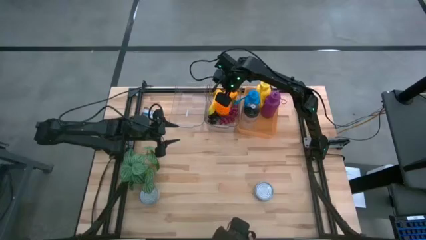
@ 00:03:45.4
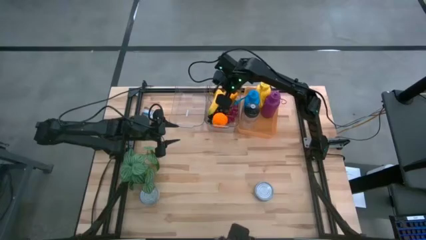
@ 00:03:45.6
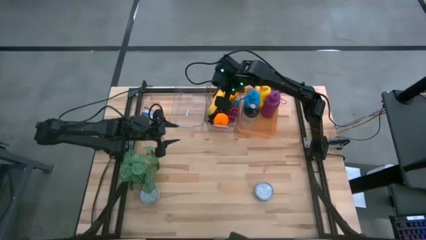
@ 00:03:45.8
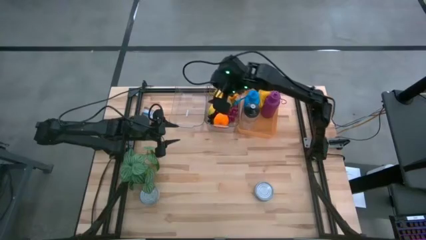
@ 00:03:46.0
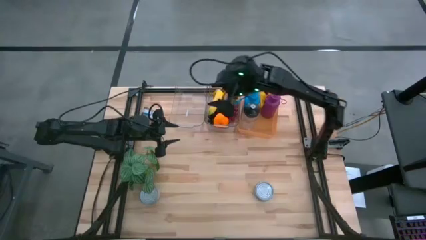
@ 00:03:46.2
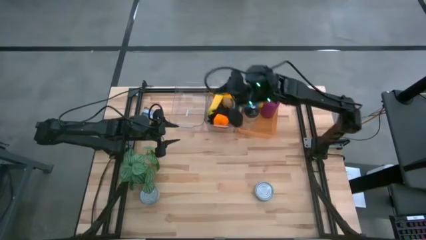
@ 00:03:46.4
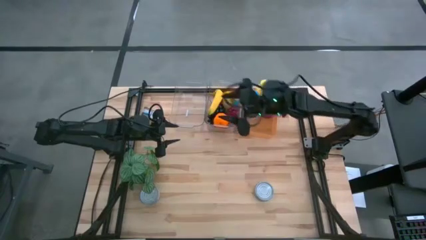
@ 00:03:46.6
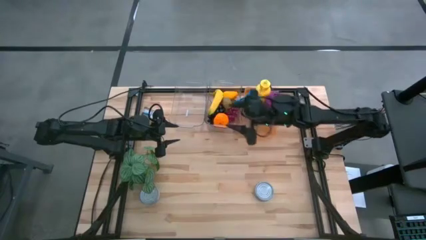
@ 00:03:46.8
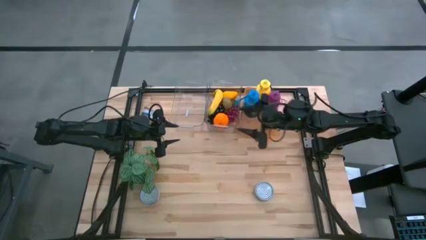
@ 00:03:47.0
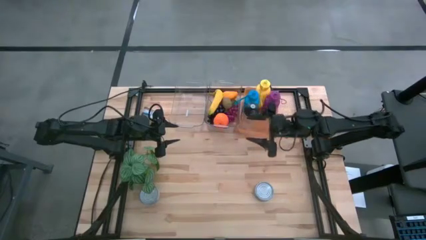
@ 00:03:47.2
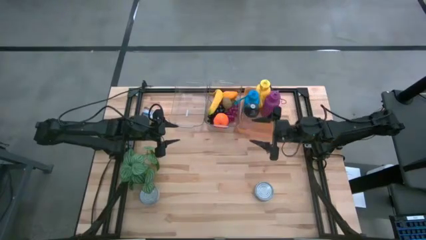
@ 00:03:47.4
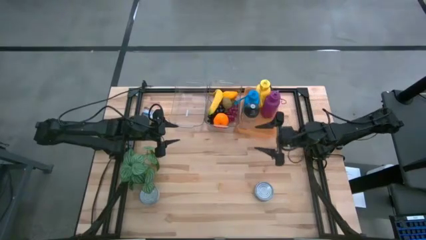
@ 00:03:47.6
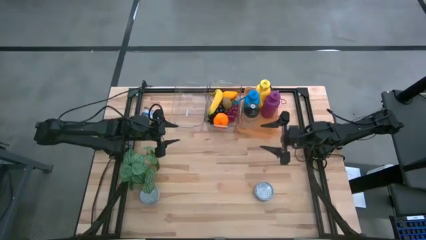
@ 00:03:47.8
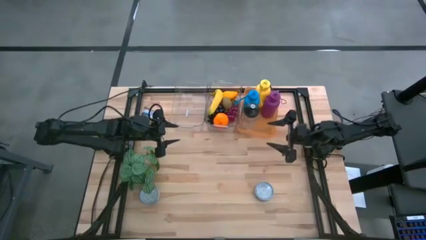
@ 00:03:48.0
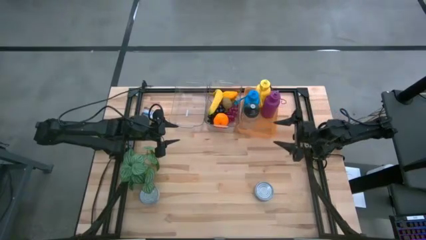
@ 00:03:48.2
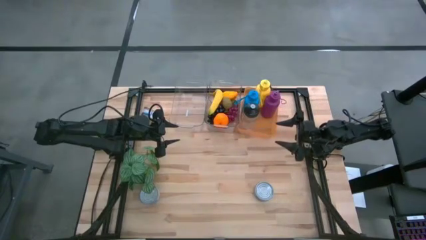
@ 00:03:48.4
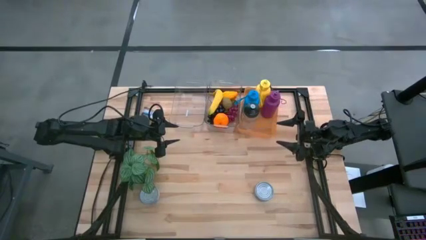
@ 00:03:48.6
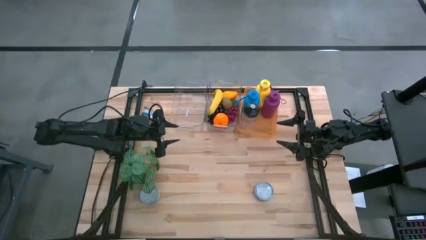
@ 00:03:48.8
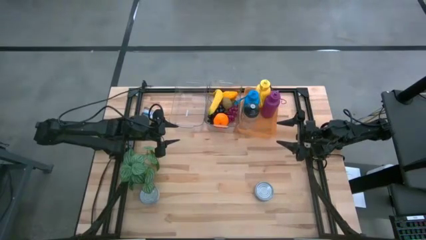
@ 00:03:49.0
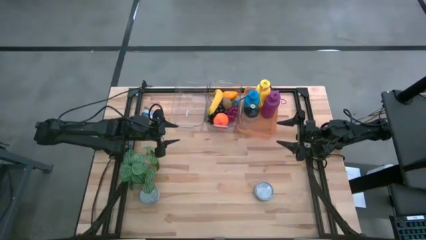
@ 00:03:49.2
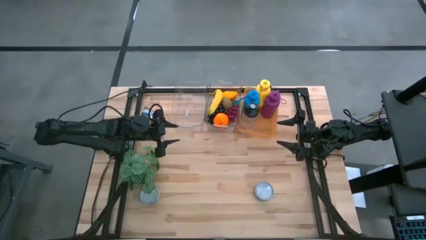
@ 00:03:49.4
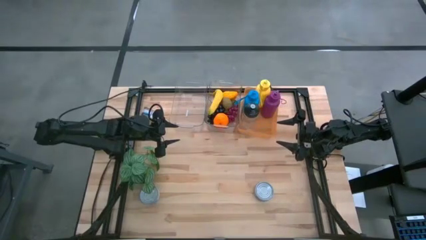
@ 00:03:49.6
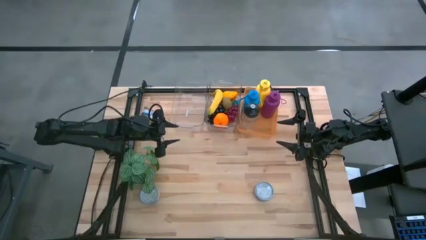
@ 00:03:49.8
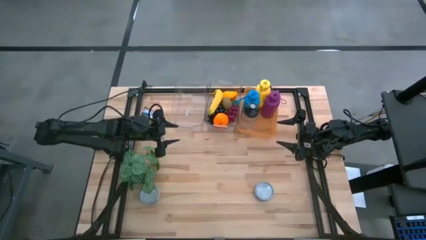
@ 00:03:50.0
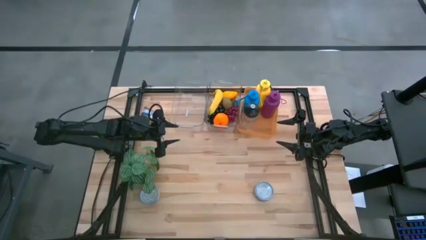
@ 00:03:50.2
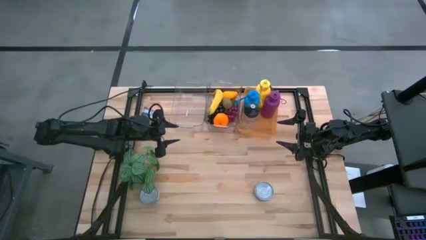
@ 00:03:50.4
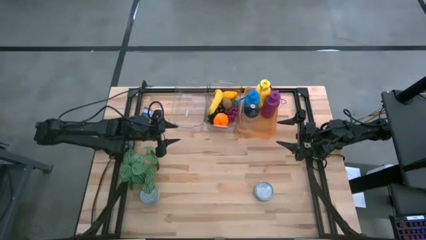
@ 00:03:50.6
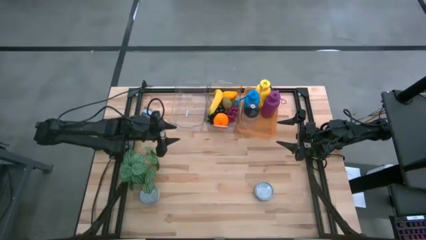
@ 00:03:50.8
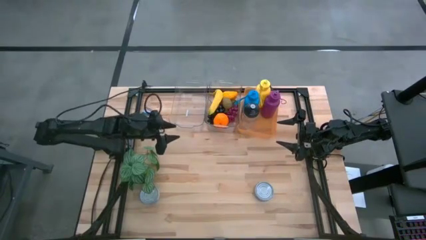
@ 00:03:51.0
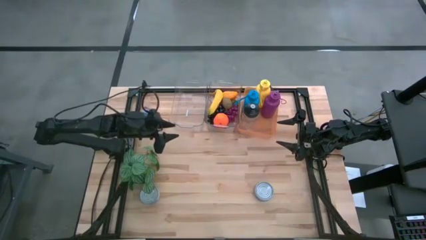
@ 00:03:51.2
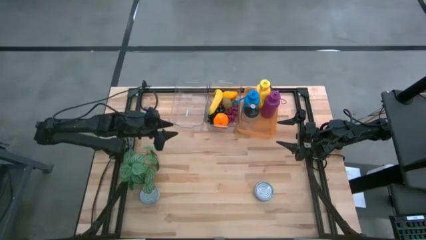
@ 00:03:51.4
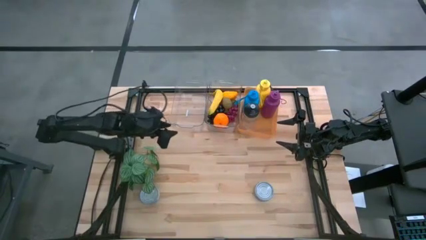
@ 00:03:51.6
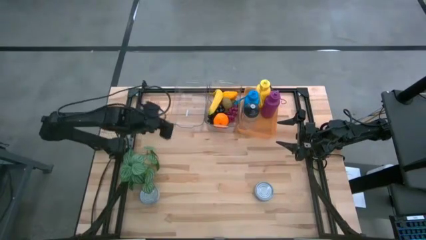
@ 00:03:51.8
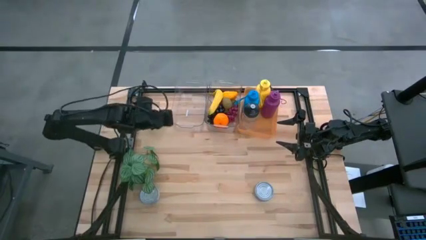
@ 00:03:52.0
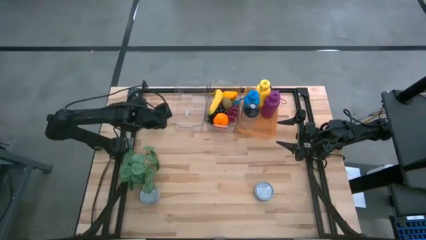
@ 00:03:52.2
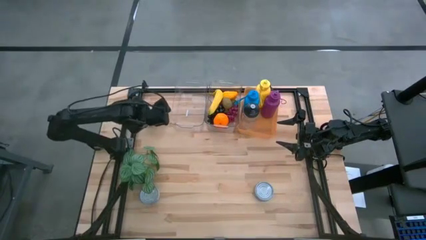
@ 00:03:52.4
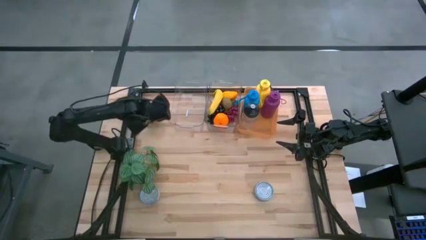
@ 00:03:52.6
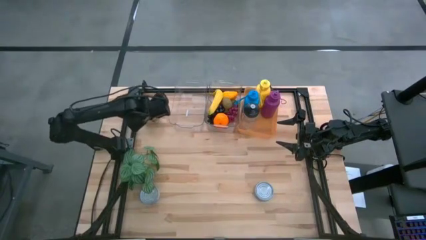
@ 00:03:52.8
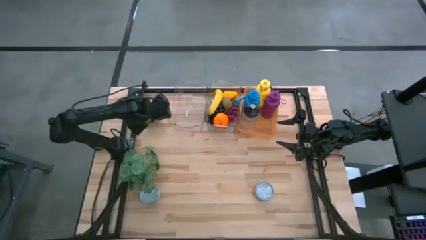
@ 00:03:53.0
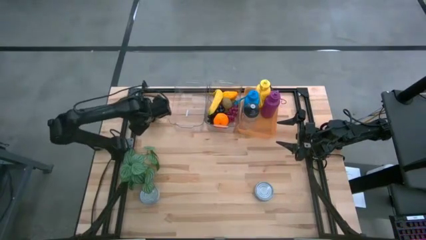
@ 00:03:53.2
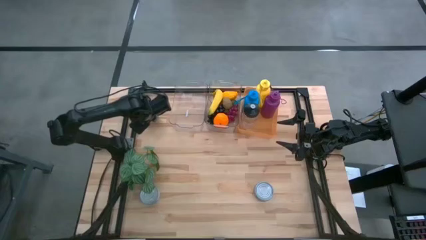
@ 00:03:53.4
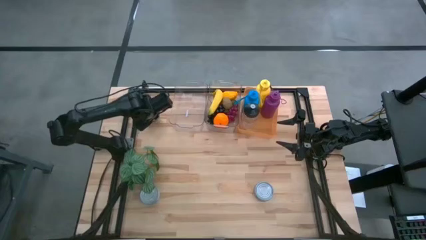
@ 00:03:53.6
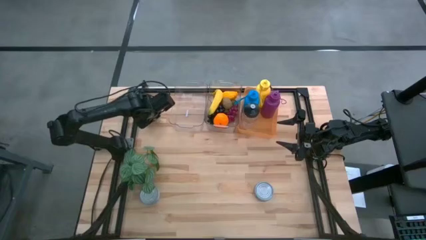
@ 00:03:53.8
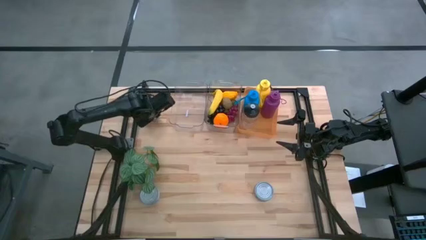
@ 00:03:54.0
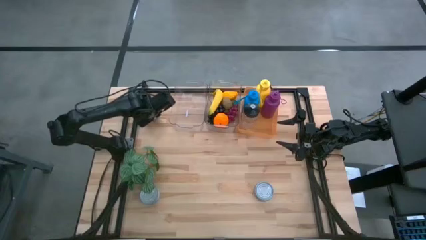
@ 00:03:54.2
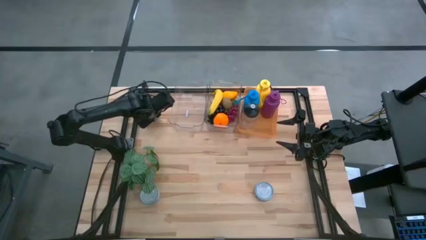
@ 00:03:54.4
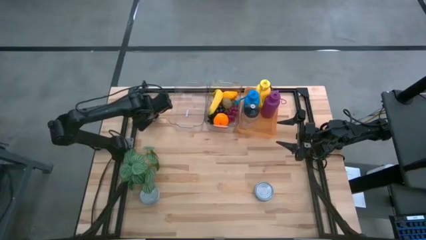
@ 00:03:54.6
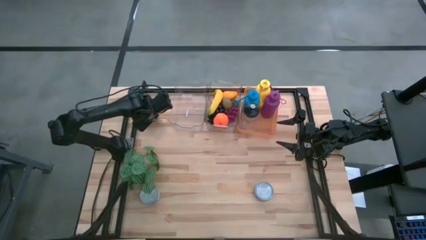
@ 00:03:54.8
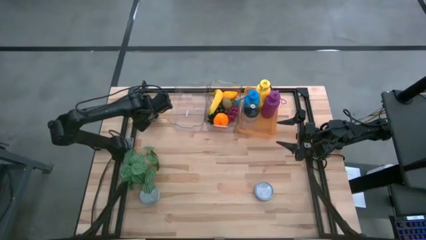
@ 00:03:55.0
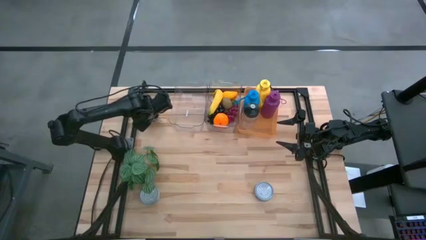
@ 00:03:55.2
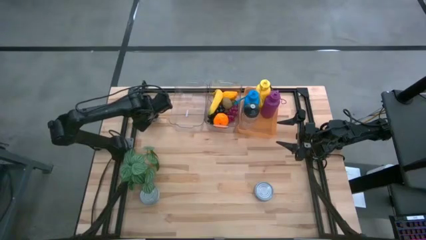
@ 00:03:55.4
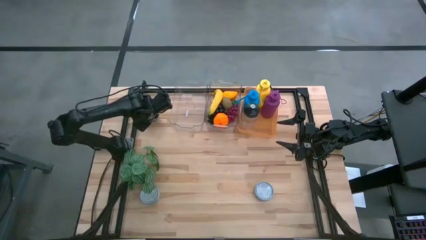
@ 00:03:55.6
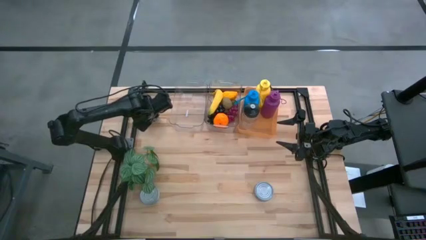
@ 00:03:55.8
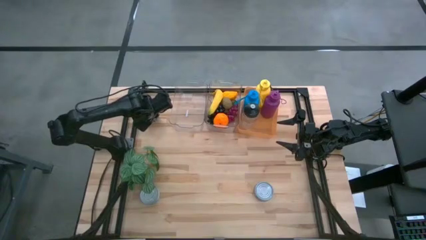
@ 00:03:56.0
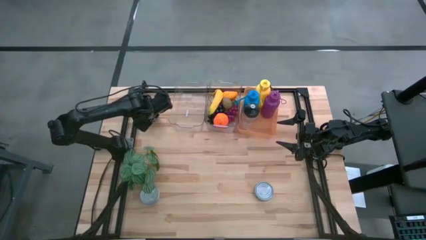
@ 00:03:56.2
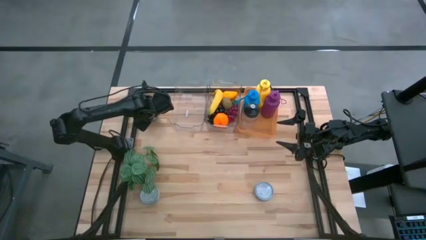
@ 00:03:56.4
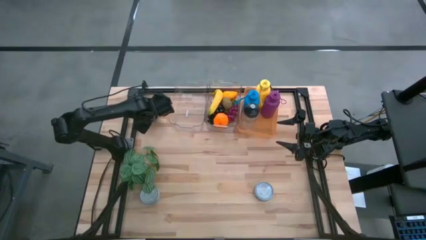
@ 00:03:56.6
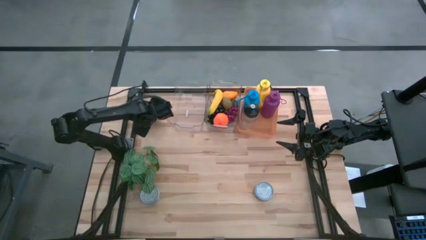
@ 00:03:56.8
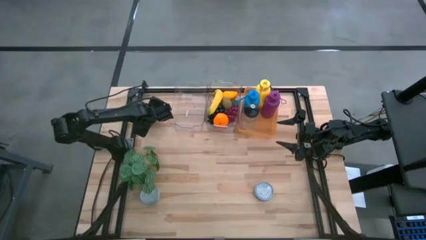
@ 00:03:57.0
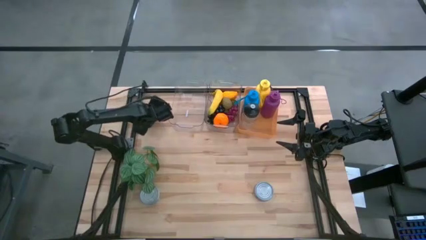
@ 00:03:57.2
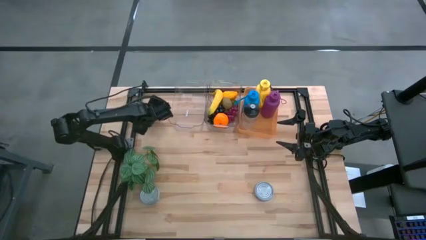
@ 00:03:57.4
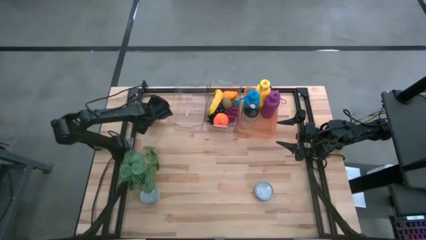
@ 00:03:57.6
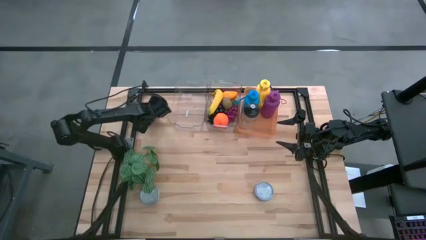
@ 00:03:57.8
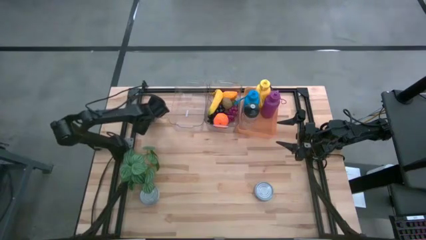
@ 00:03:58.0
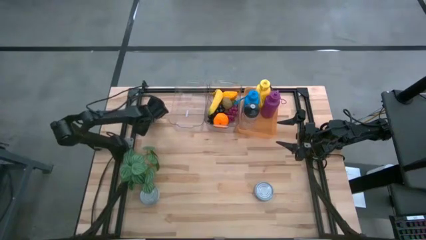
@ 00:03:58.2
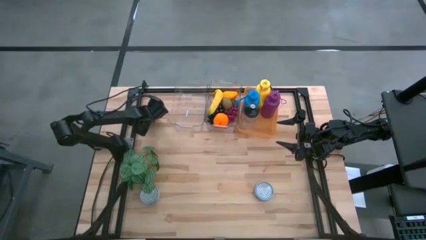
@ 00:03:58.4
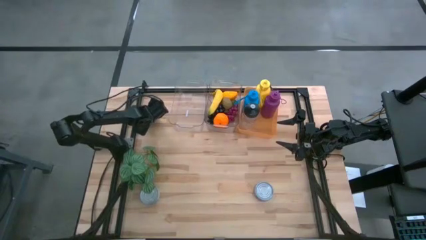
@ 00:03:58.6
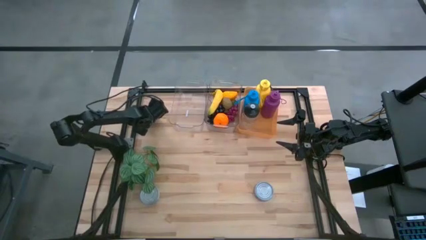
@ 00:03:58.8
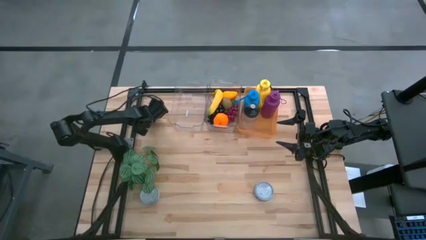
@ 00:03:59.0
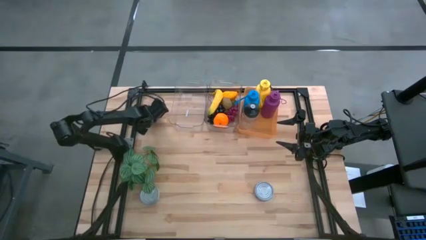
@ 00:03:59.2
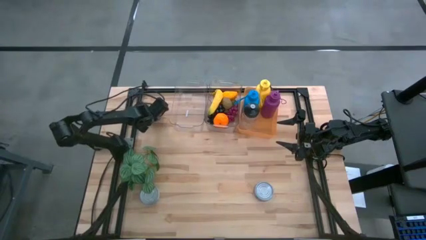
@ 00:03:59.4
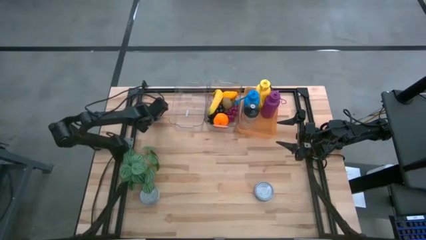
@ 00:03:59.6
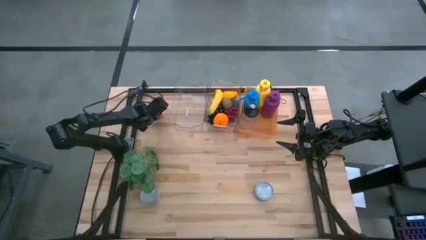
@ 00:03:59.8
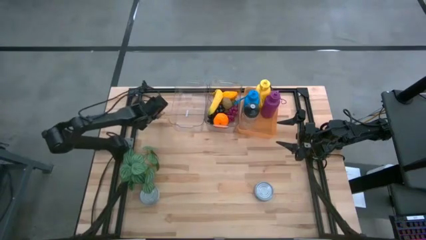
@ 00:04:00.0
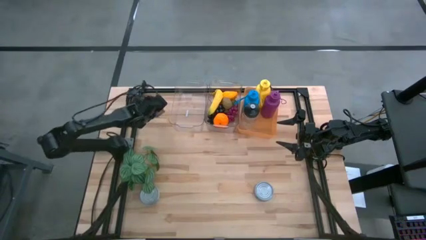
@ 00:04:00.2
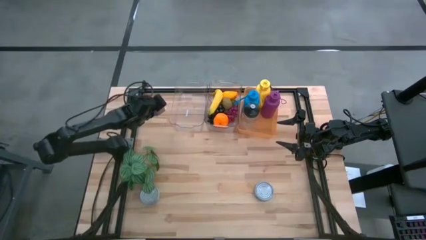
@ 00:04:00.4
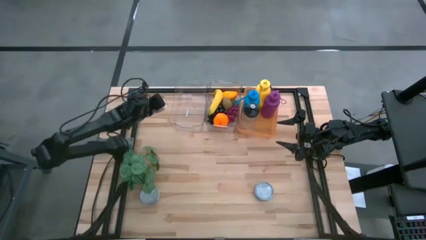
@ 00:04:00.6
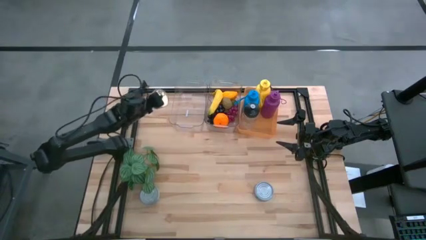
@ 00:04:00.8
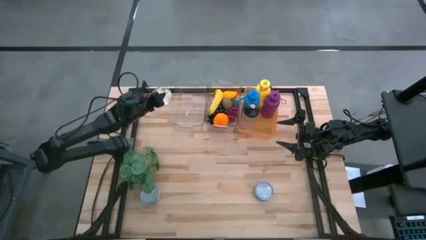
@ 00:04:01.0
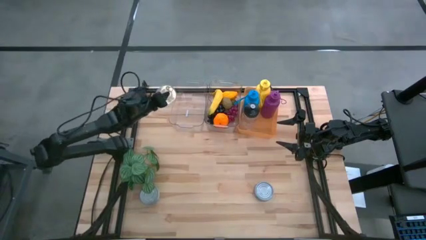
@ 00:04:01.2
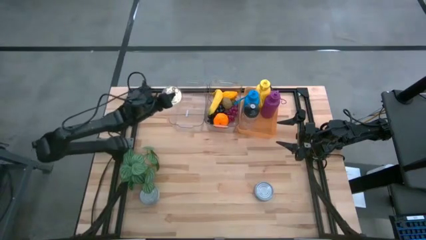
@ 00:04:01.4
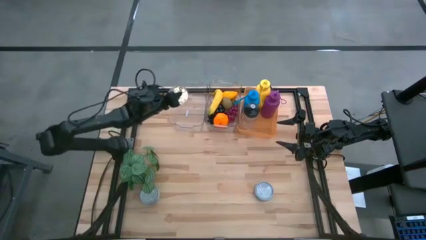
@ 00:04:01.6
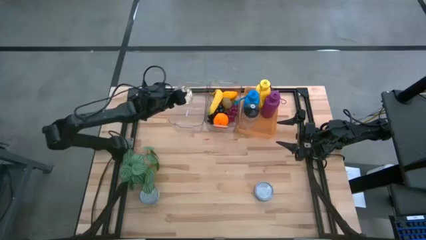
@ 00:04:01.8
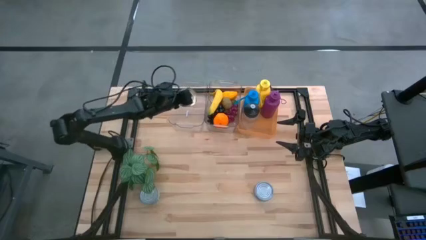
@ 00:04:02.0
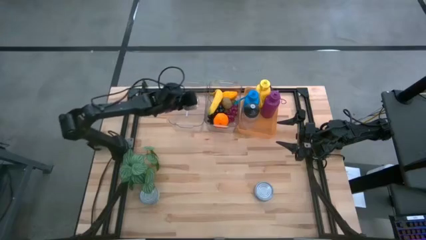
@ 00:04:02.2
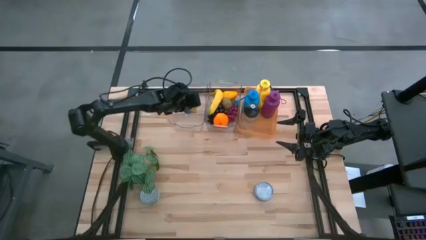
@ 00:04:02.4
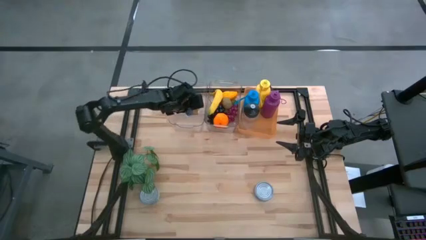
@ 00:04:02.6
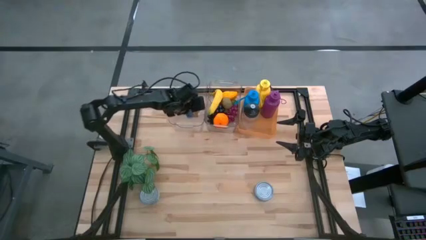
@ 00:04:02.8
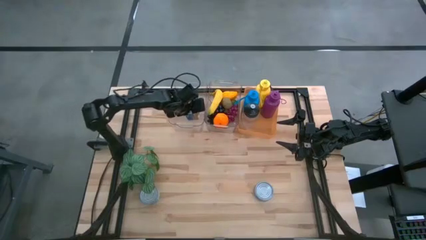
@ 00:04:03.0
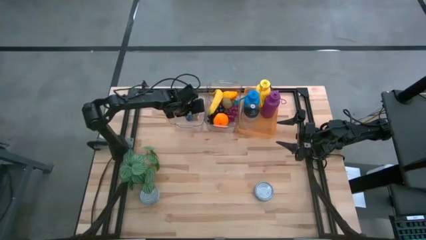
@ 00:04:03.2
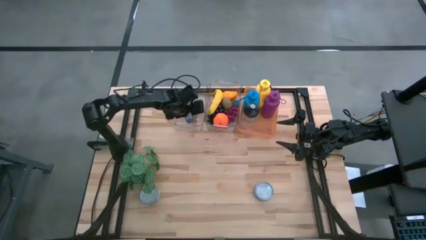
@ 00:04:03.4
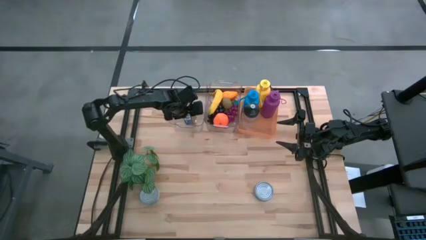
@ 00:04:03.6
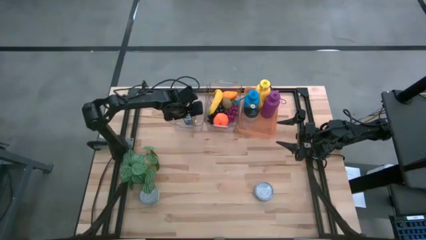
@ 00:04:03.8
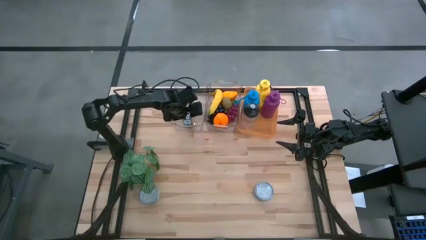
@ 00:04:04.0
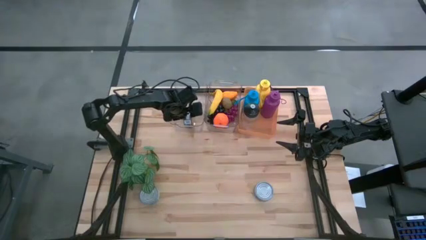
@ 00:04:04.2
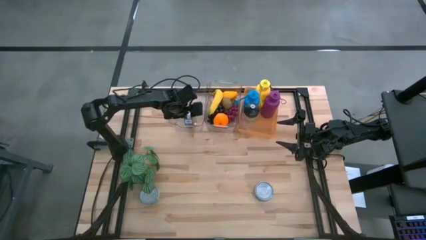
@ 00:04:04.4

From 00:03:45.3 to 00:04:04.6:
Task: Pick & Place Food Item
Put the blue and pink tuna can into the left transparent bin
